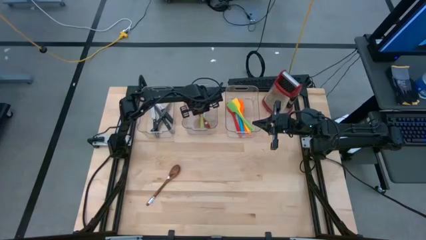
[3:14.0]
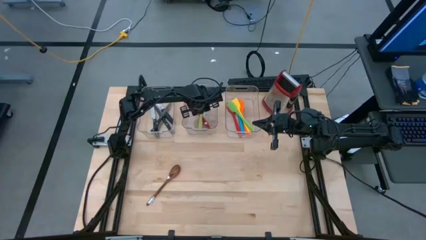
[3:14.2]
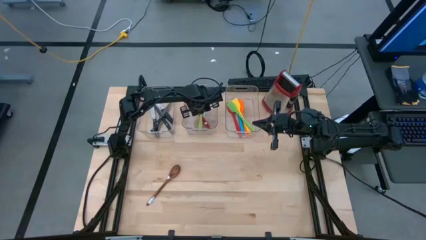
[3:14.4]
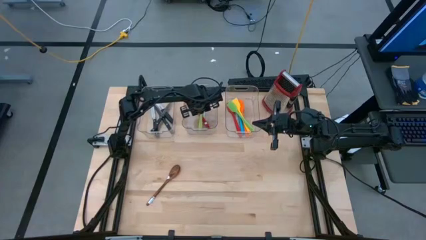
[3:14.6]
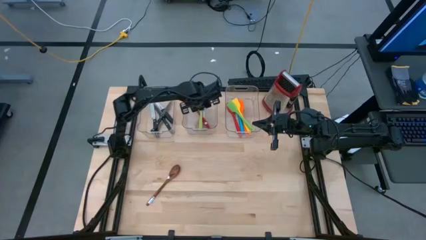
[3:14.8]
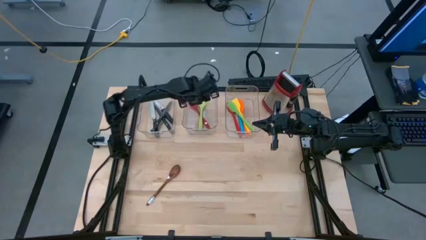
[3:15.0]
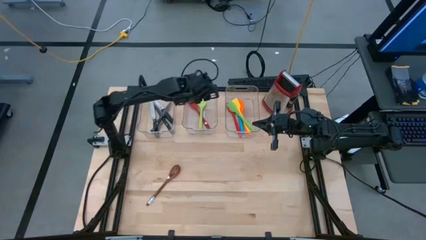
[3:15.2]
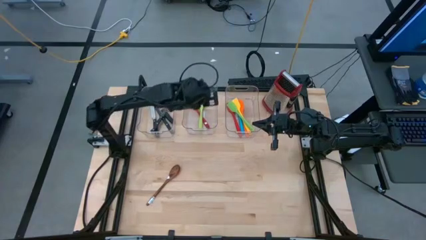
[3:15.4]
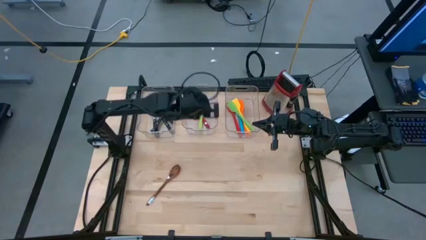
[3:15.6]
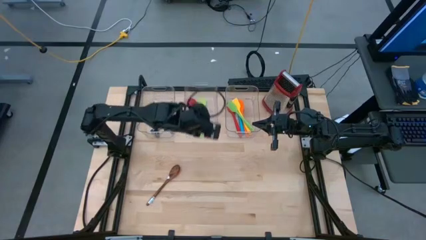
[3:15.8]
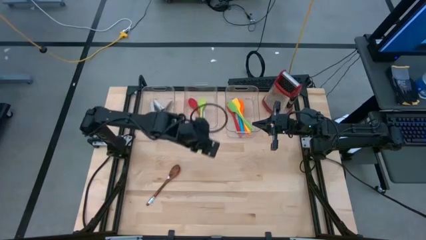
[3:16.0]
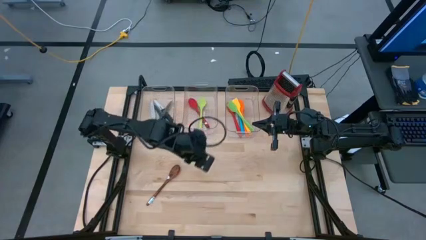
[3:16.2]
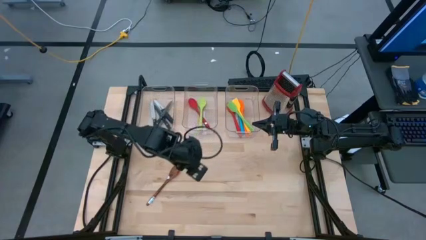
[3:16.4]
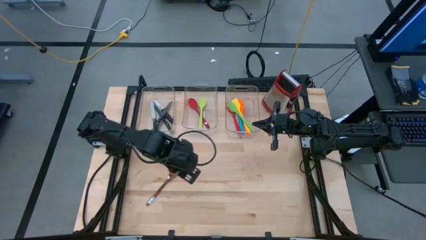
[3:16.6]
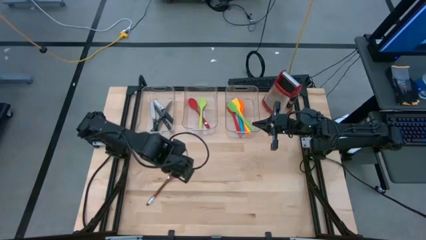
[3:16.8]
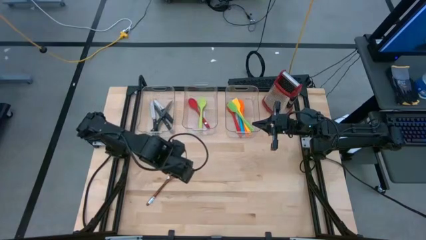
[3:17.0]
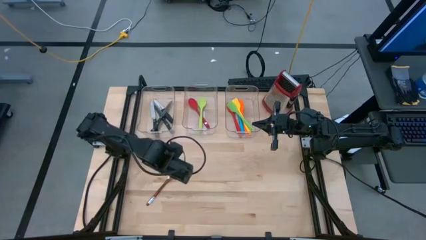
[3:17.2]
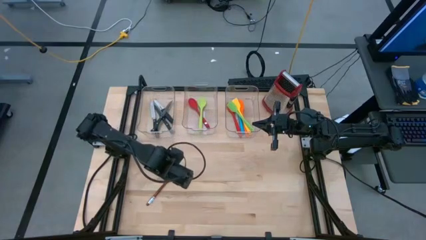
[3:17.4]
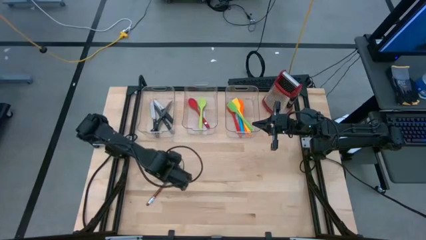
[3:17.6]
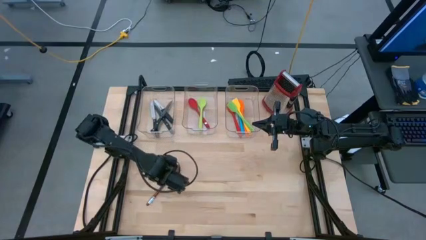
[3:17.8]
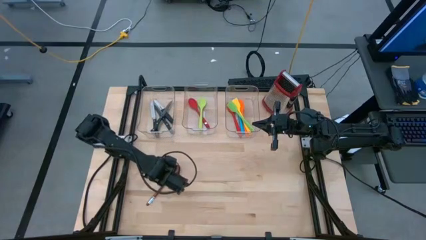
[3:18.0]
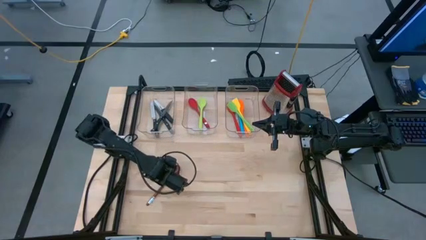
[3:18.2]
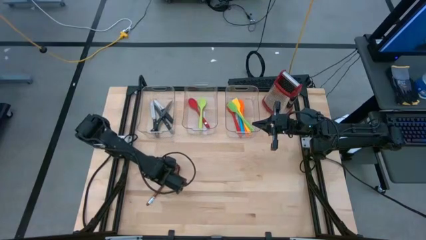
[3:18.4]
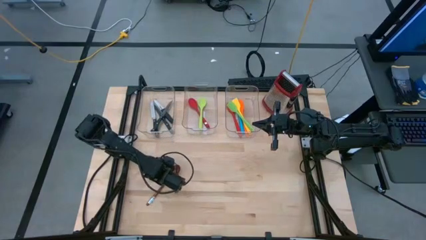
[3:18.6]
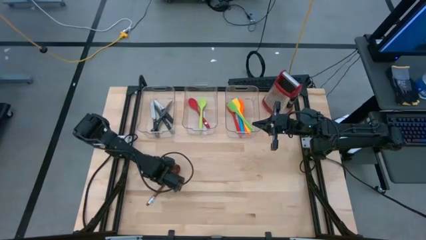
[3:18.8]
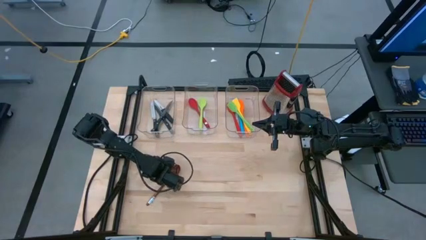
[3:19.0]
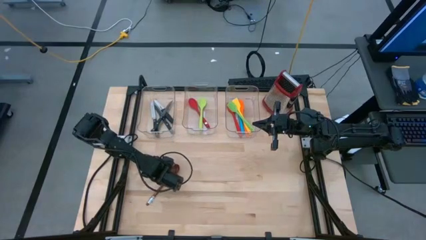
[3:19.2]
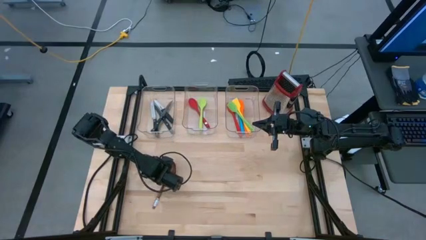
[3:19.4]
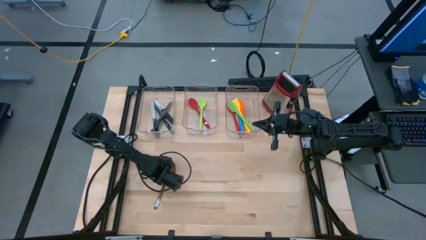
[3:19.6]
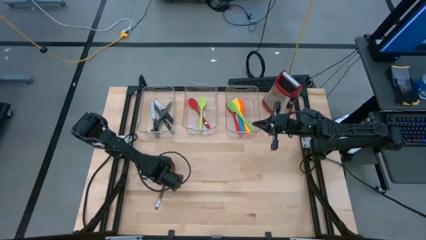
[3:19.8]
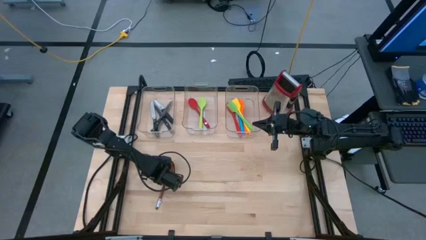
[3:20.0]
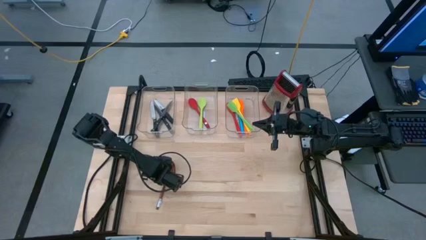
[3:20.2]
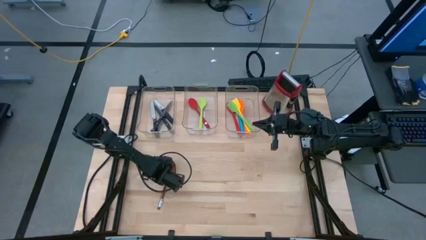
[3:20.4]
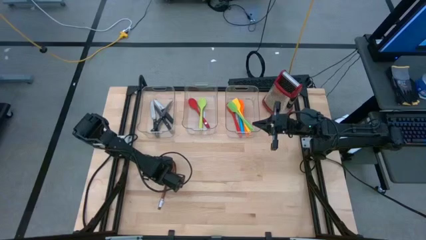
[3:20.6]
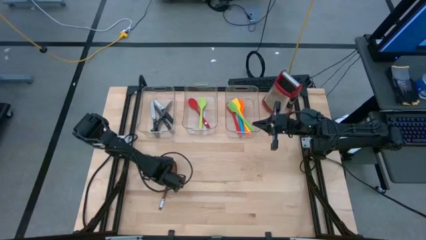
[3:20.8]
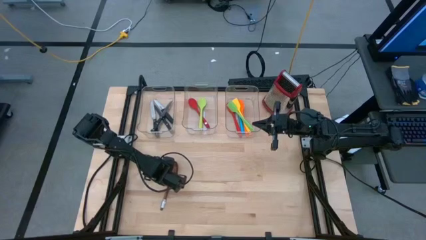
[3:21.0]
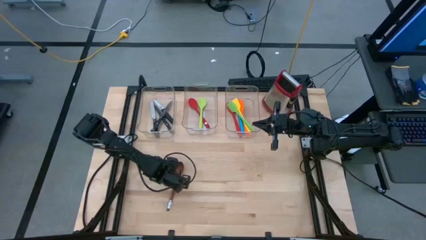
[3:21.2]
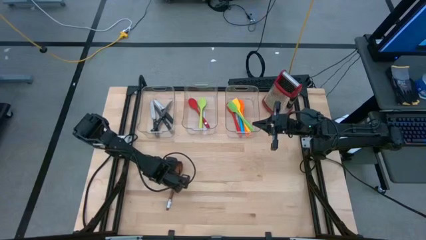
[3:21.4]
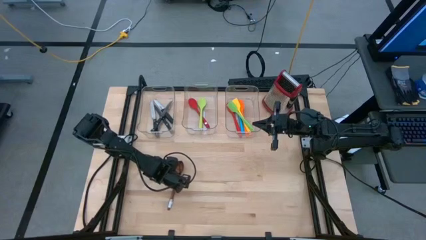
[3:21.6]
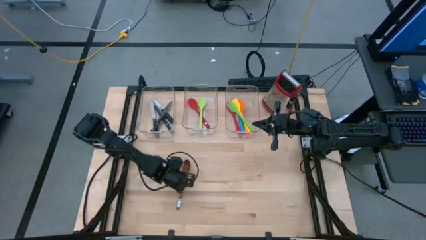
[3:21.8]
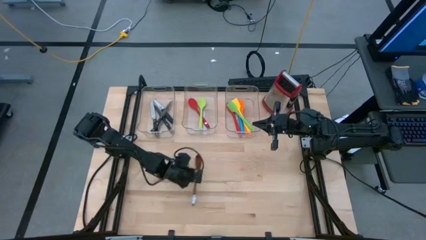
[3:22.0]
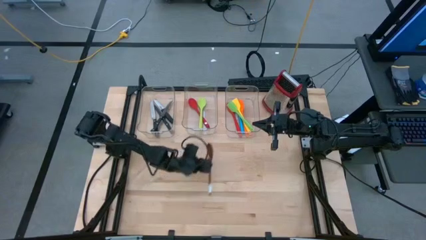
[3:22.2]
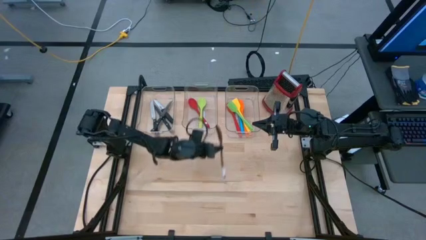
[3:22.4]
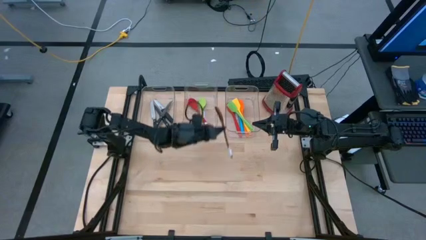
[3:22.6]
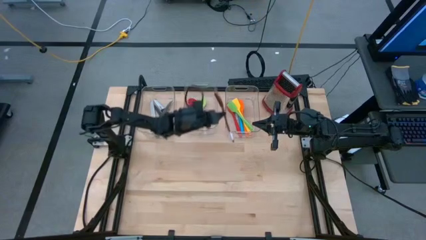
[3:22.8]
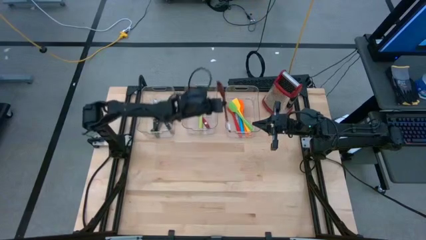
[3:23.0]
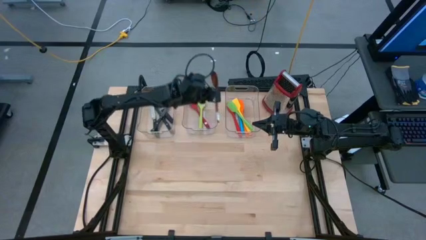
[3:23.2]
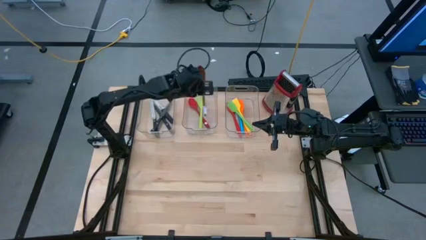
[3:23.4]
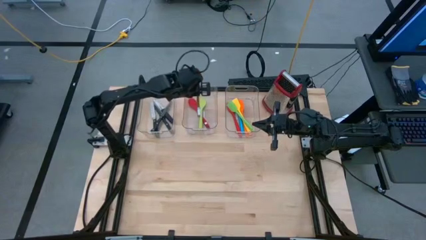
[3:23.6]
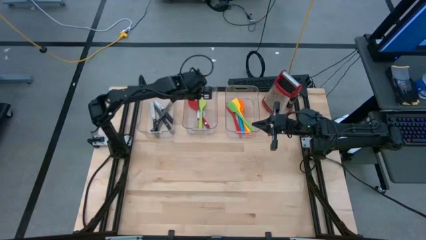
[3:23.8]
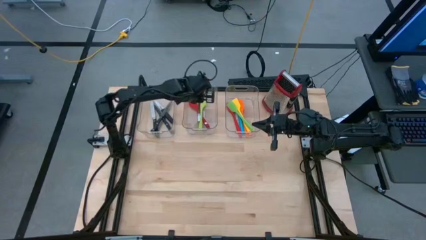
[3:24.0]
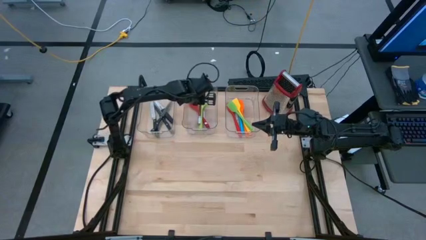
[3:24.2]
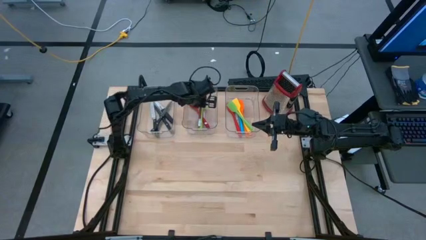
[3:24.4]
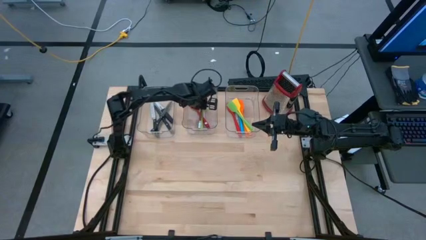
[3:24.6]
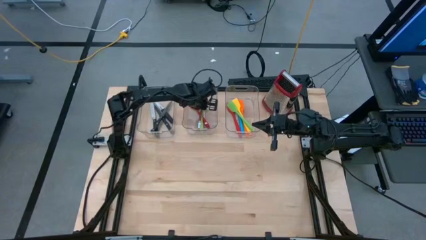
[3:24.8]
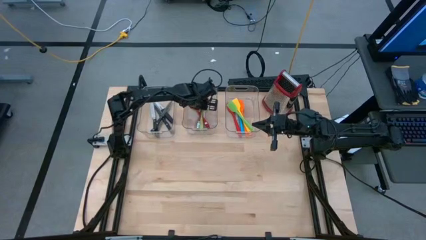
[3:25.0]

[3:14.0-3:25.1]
Task: Pick & Place Kitchen Items
Put the brown wooden serving spoon into the middle transparent bin
